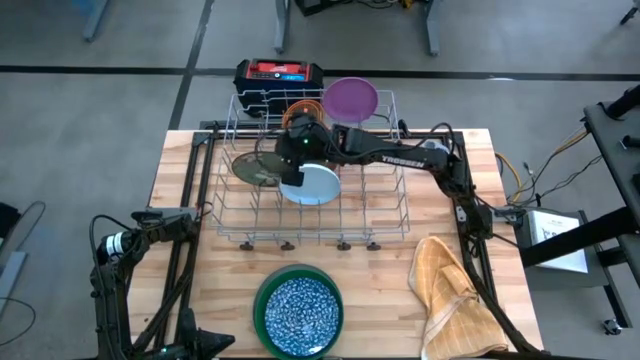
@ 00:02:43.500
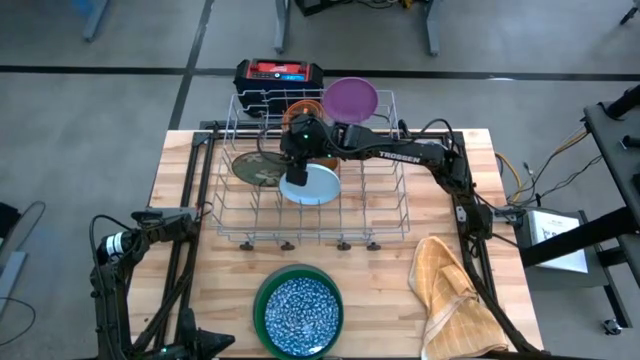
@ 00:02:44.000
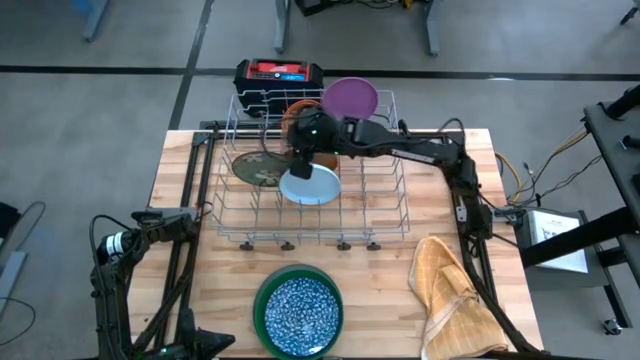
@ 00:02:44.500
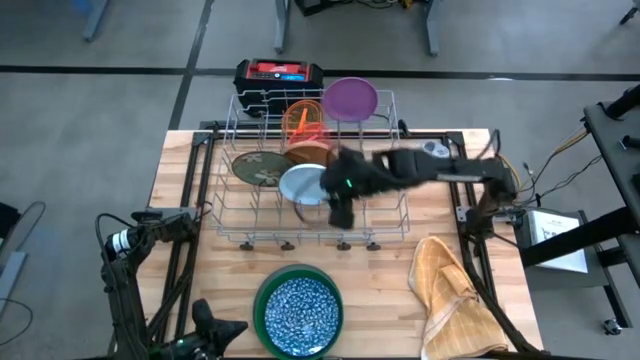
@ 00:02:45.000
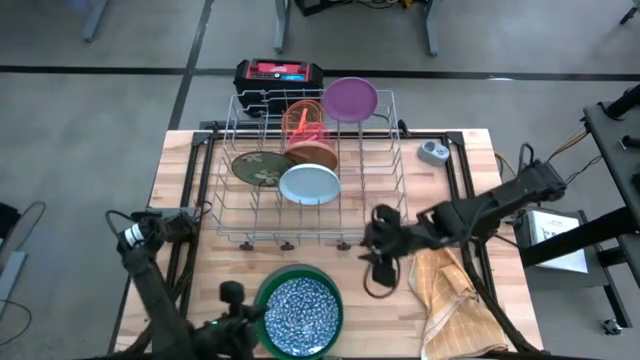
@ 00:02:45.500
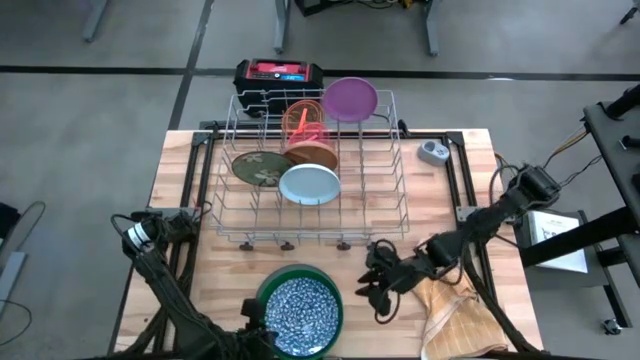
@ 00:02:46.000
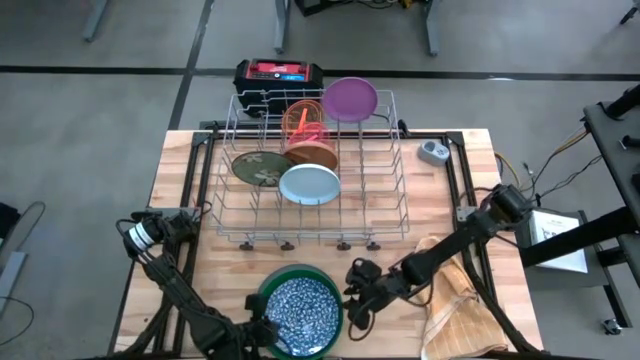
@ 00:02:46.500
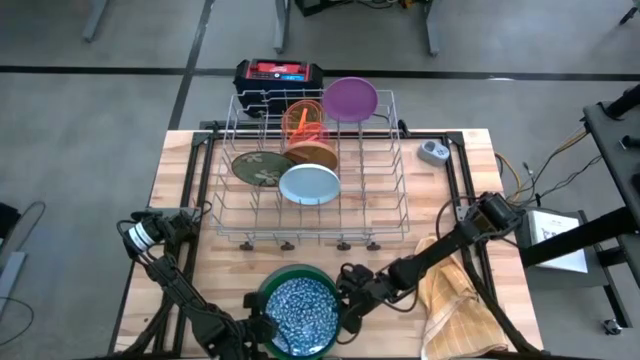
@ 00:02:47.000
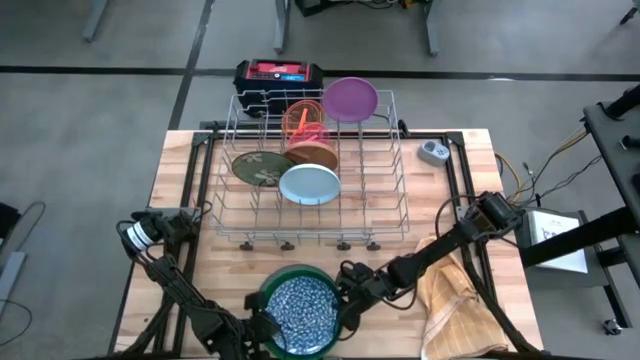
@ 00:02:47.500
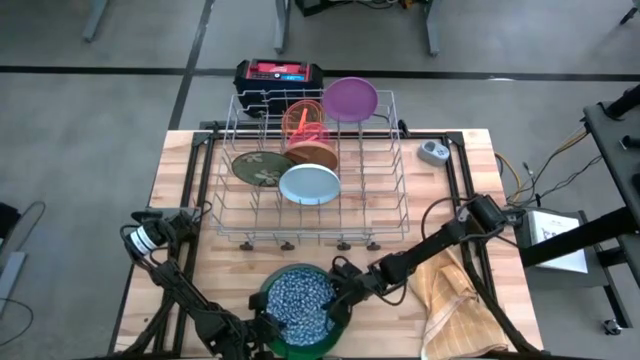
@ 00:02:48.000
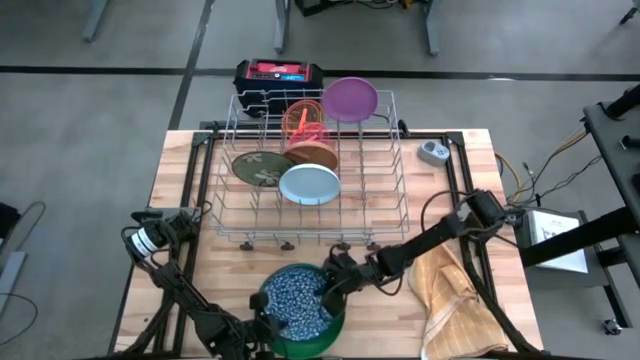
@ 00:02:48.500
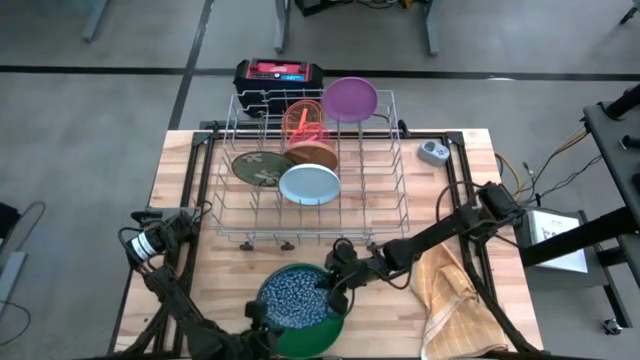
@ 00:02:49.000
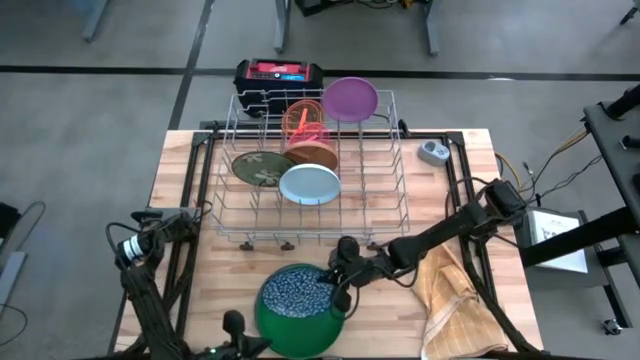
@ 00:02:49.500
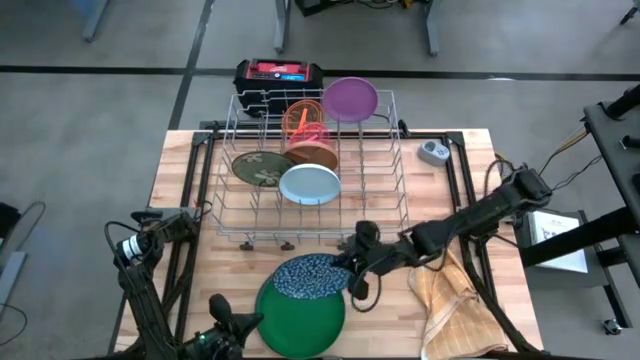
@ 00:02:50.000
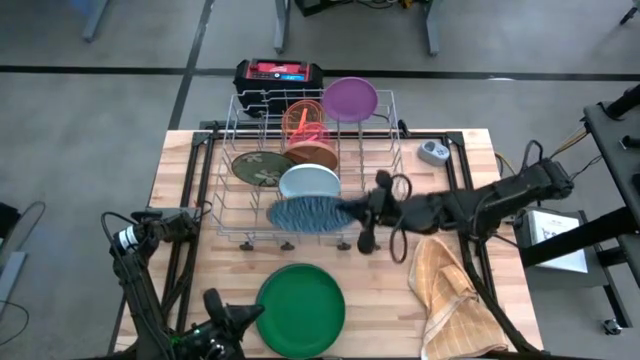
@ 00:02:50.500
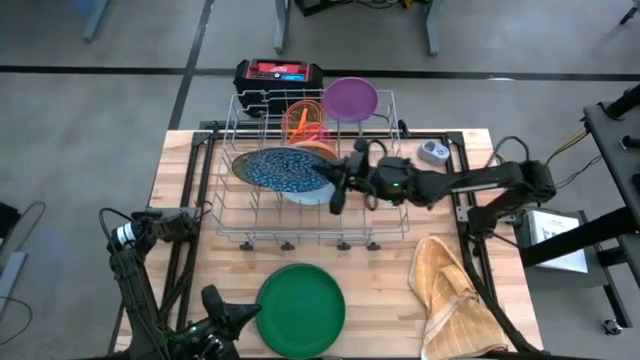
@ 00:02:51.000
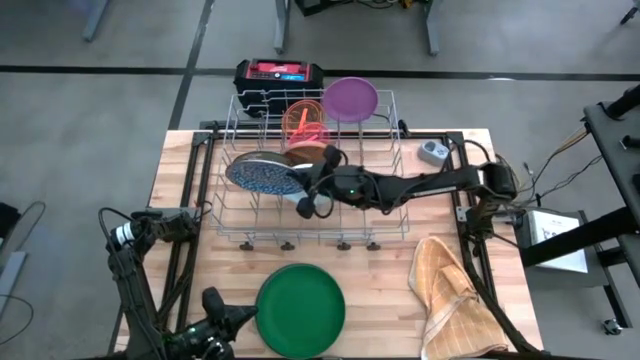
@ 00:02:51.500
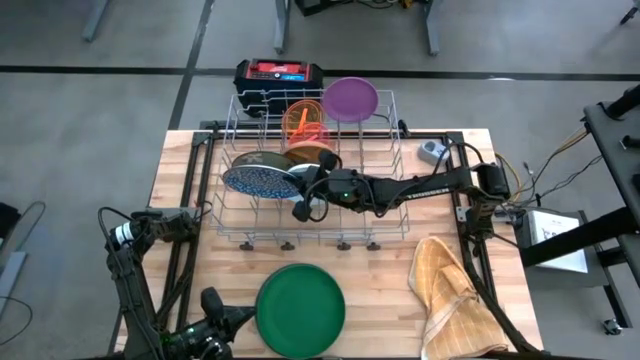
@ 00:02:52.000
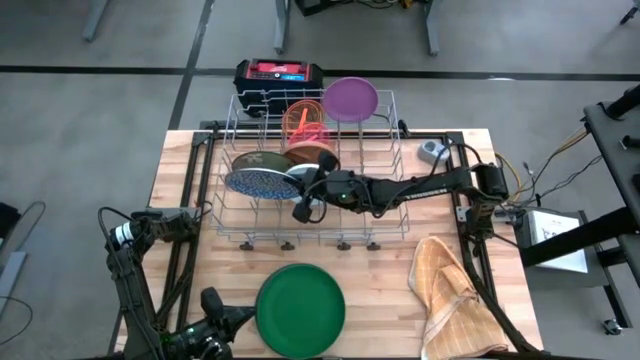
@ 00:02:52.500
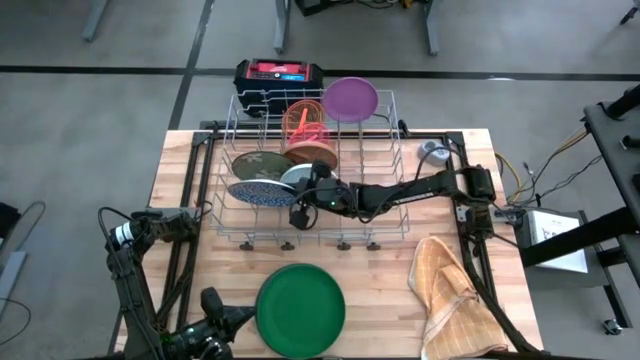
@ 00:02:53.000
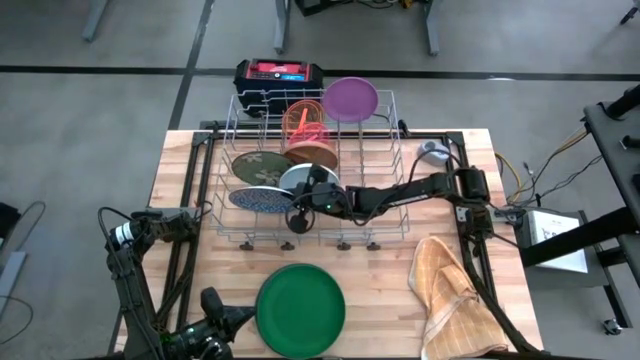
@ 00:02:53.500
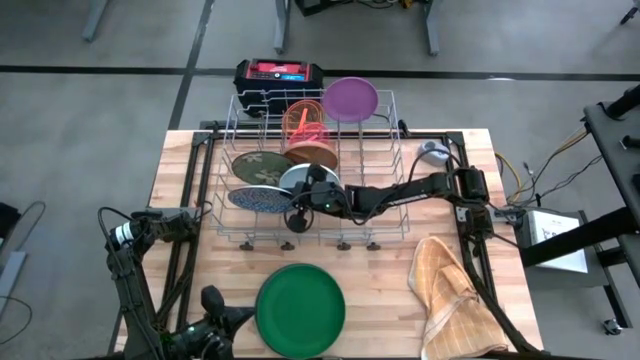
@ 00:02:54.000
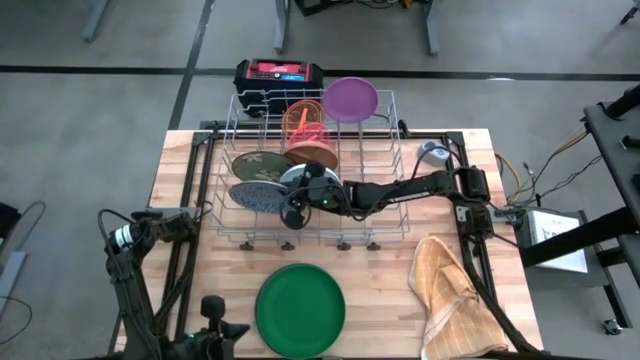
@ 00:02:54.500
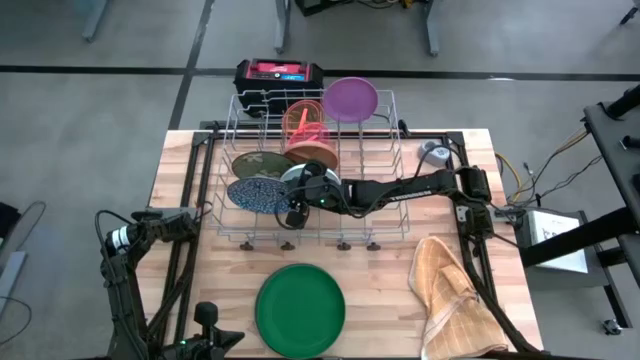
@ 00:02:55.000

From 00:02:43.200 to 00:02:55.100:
Task: Sort dishes
Put the blue patterned plate into the dish rack

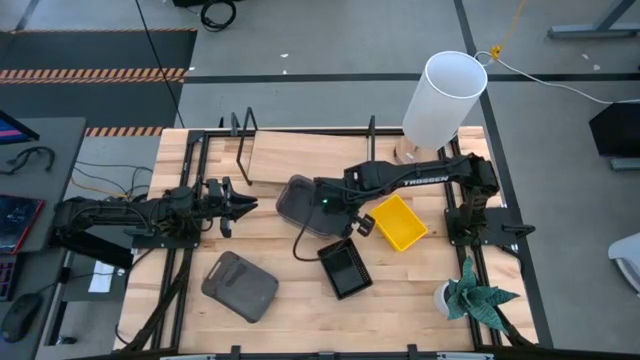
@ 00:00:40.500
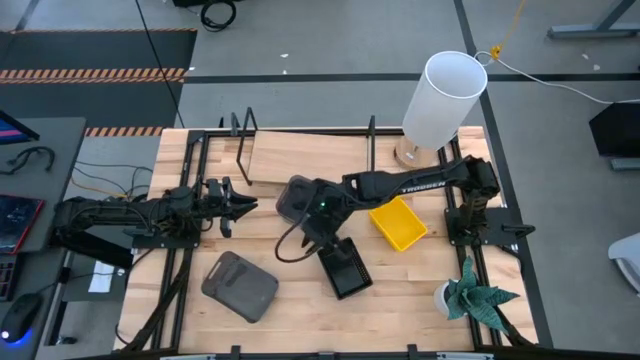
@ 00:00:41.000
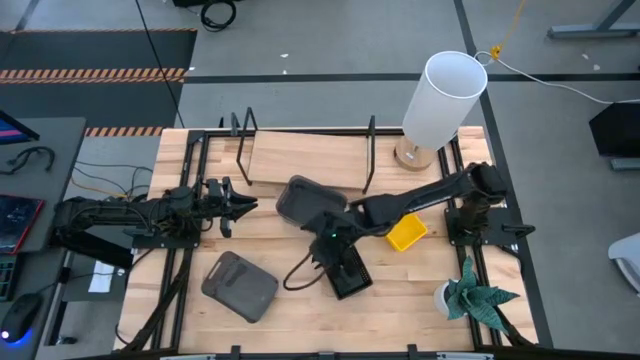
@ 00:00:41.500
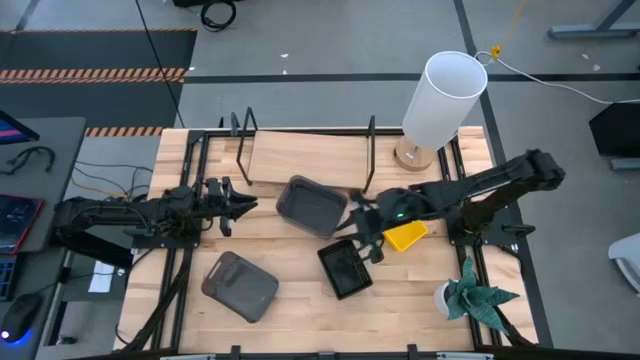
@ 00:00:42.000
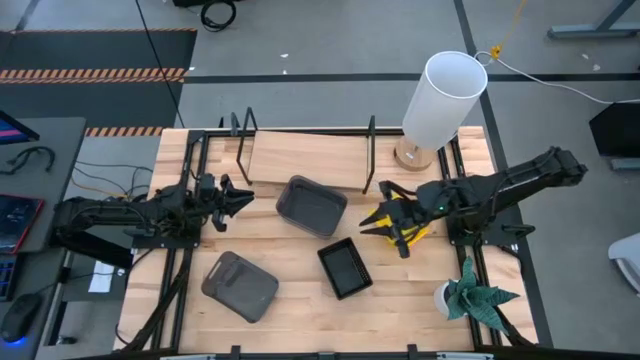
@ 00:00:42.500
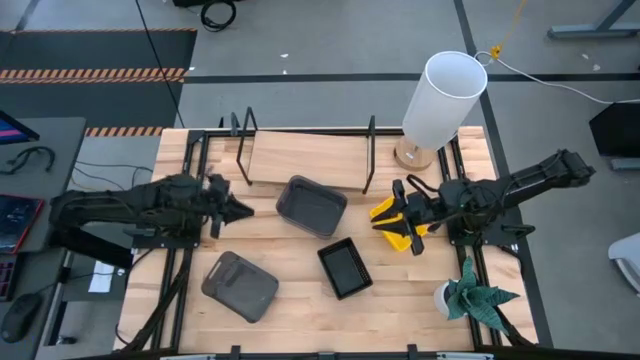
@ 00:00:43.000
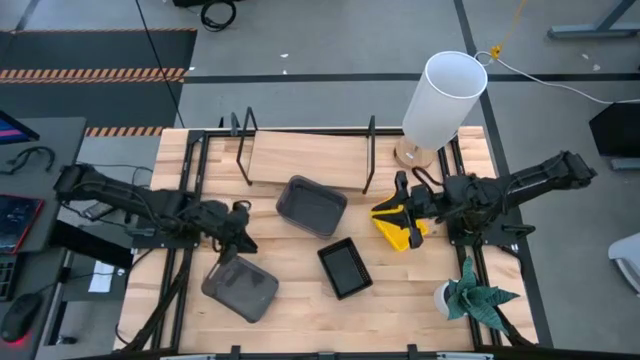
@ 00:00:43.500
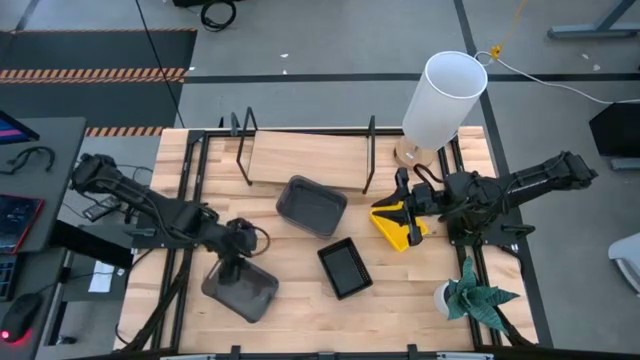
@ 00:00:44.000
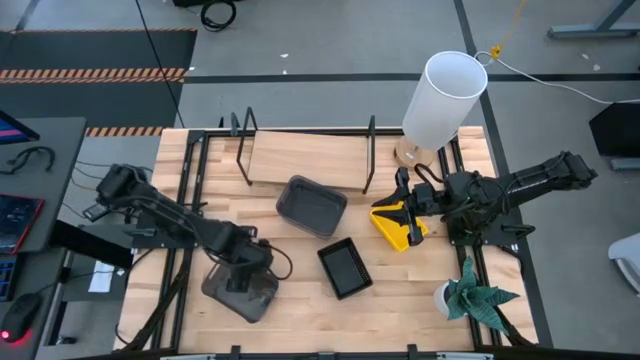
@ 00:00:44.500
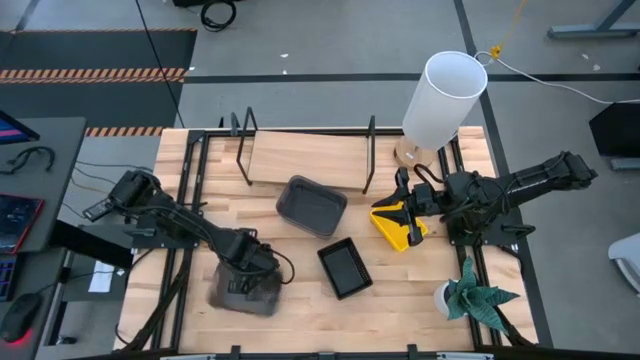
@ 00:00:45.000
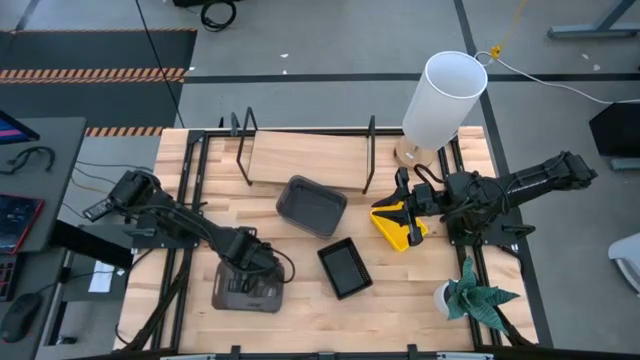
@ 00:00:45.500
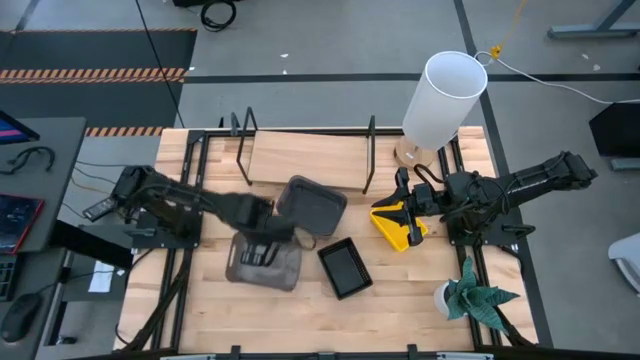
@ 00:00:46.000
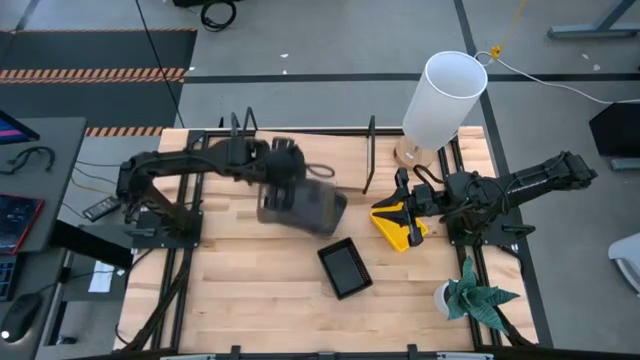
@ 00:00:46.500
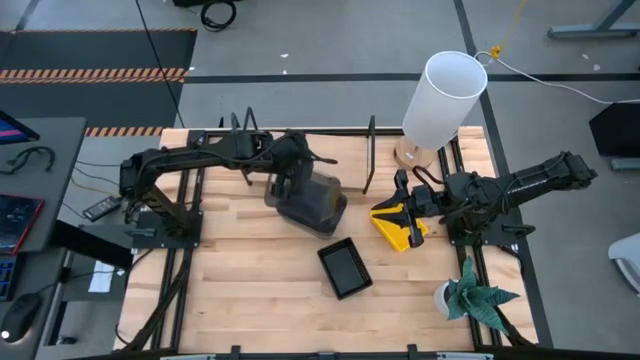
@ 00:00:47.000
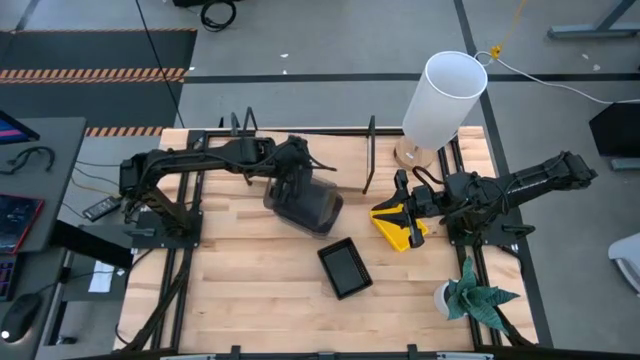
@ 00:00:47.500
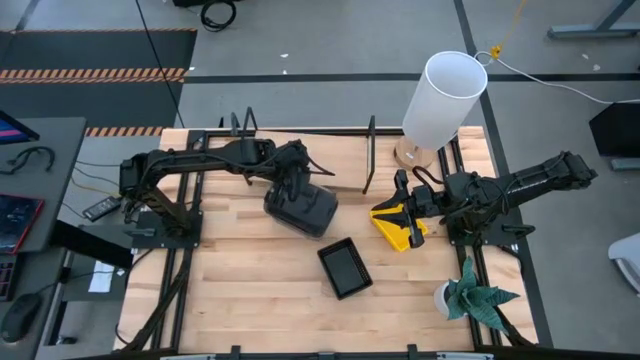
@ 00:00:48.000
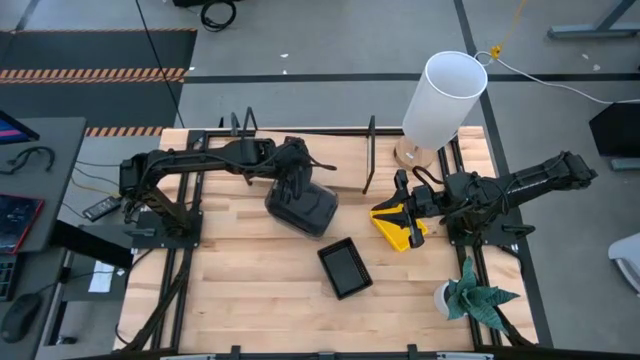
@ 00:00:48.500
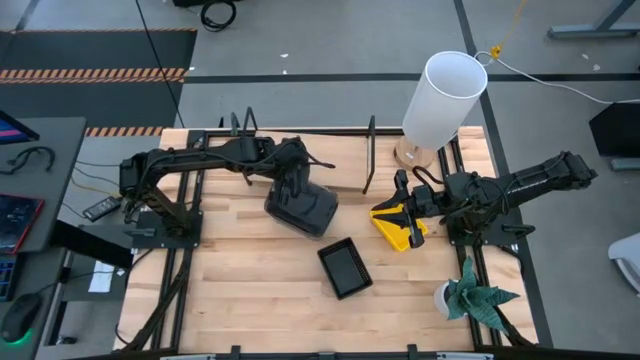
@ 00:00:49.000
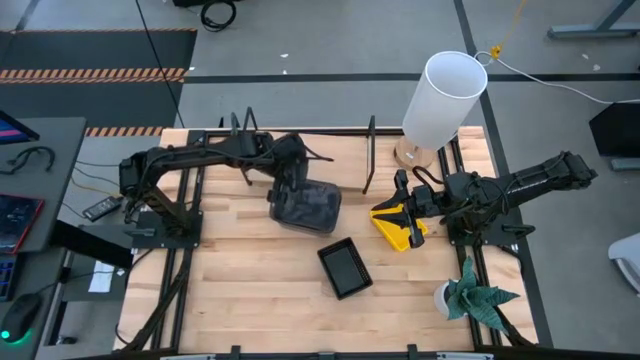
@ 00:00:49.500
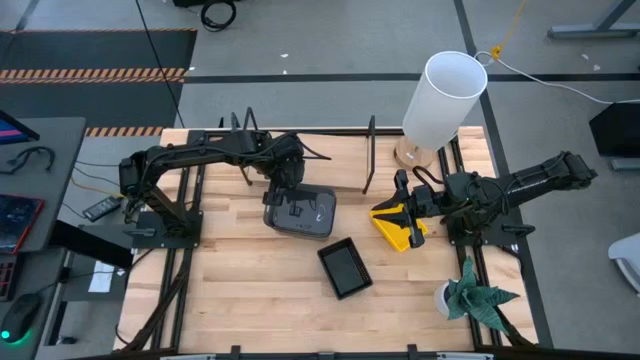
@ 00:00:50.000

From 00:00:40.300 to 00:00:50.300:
Task: Stack baskets on shelf by color
Stack the bottom black bin on the top black bins
